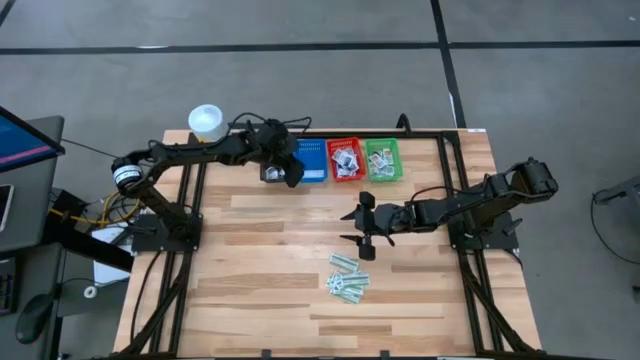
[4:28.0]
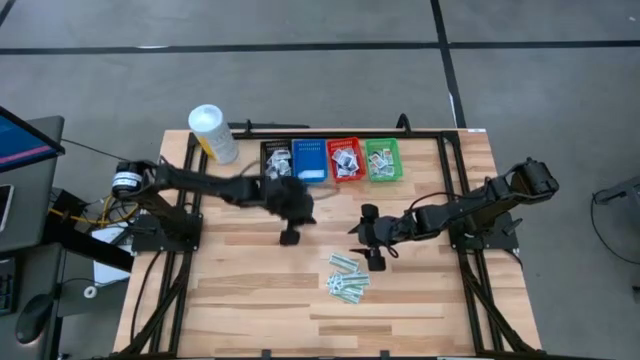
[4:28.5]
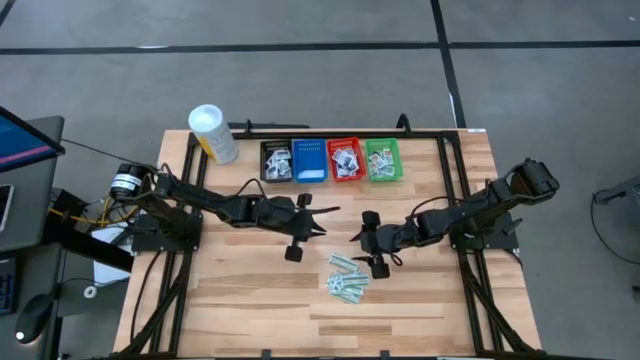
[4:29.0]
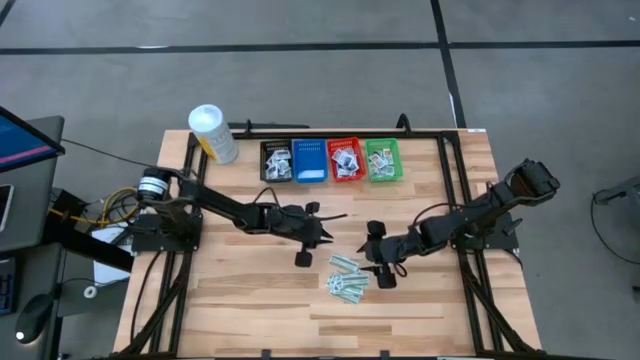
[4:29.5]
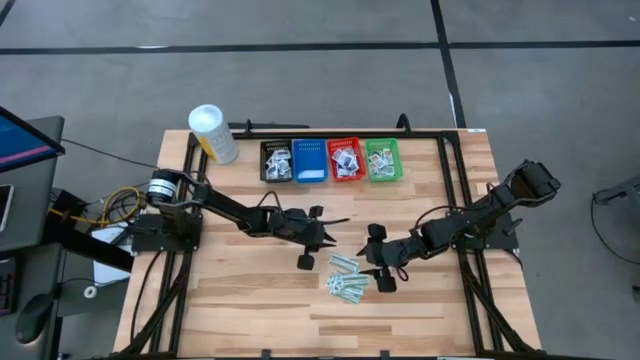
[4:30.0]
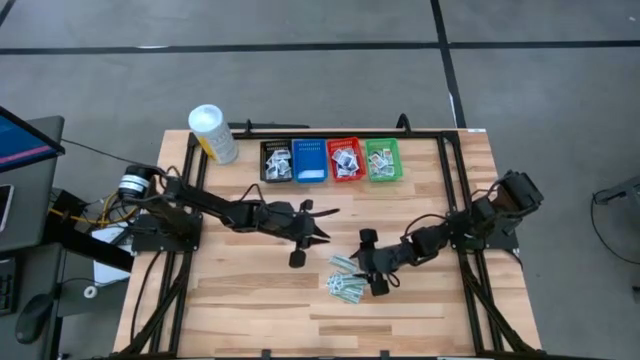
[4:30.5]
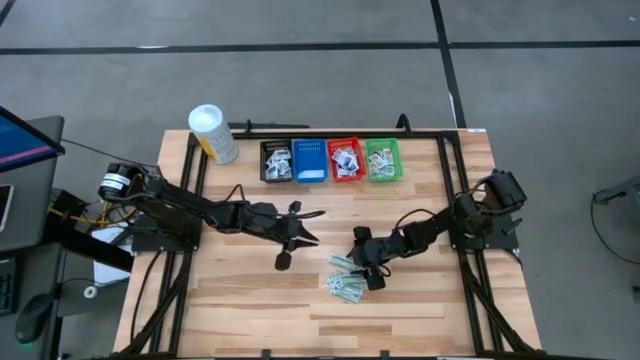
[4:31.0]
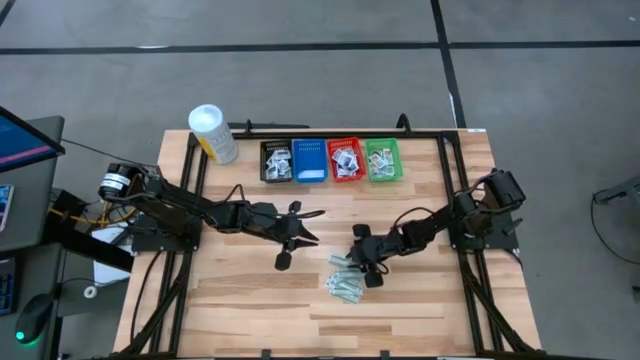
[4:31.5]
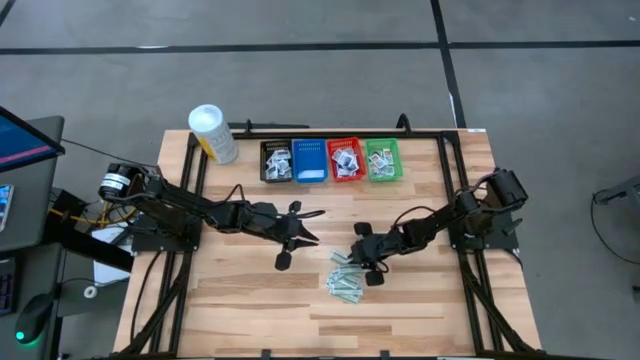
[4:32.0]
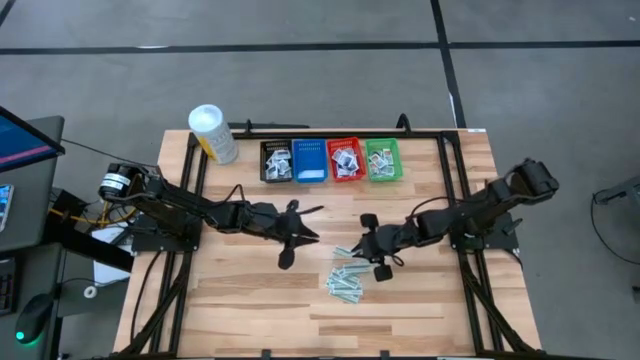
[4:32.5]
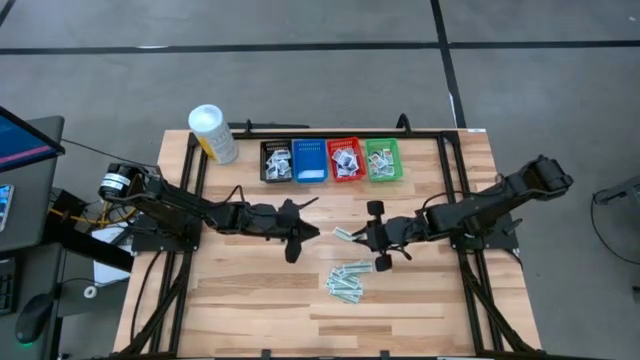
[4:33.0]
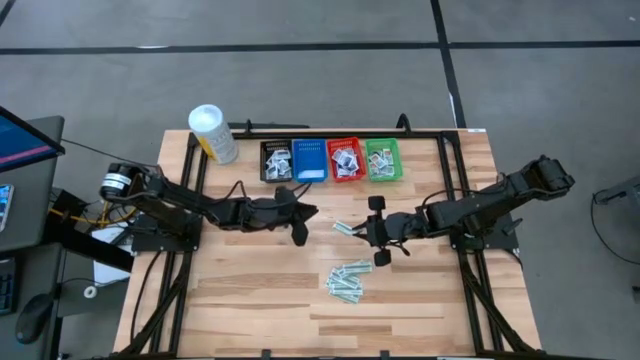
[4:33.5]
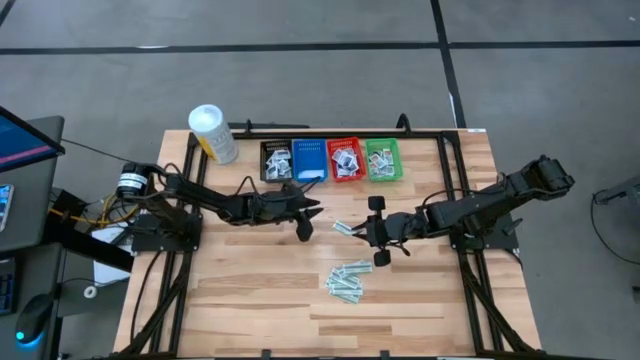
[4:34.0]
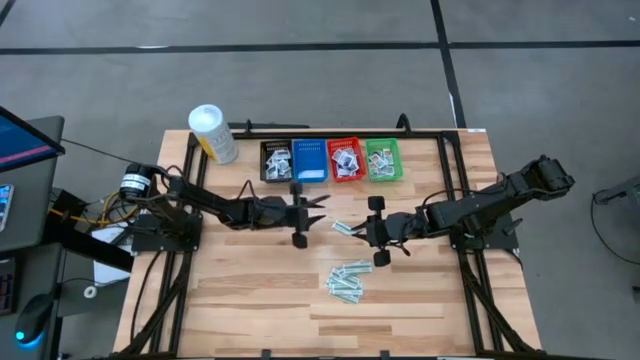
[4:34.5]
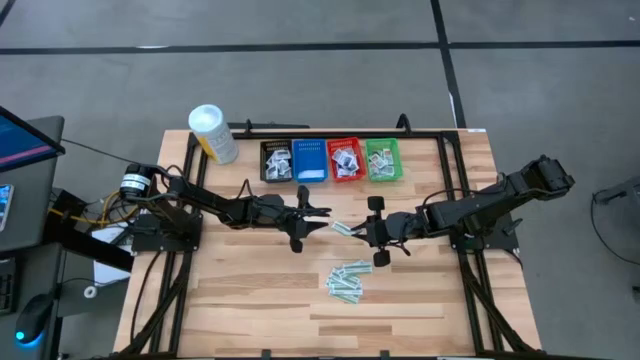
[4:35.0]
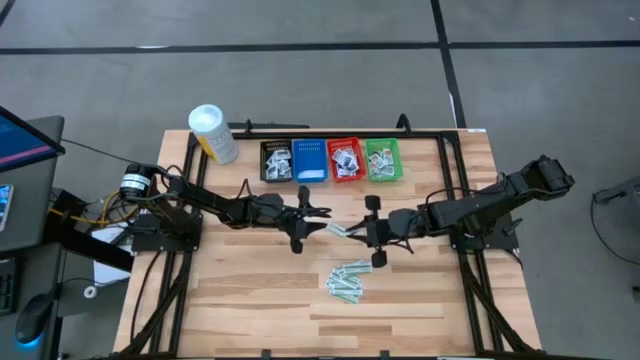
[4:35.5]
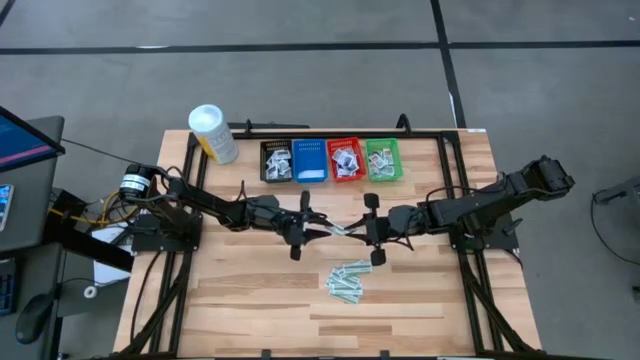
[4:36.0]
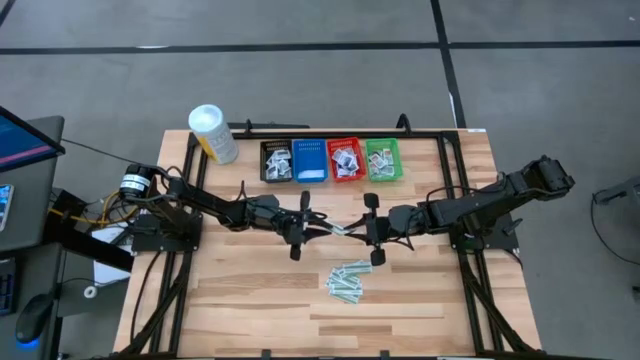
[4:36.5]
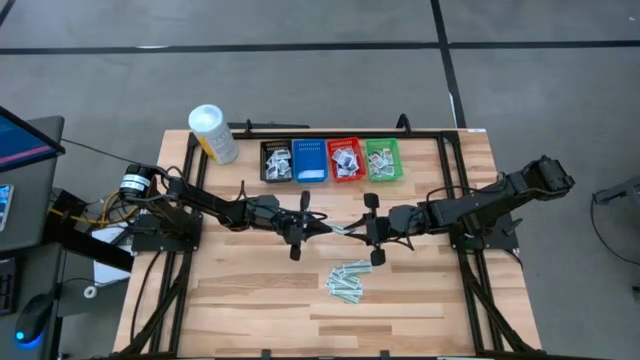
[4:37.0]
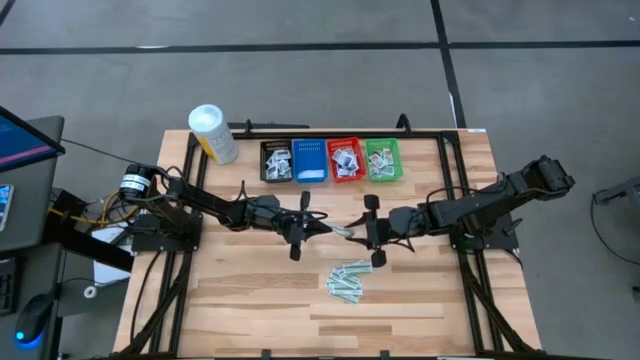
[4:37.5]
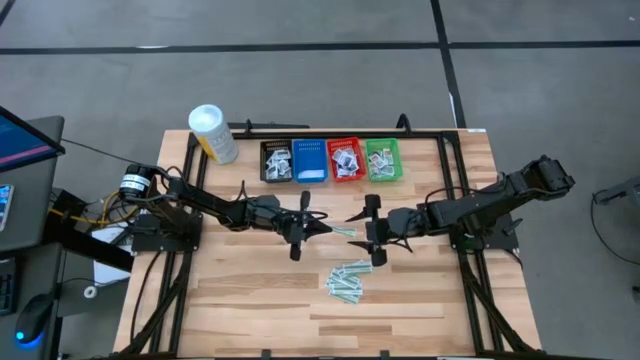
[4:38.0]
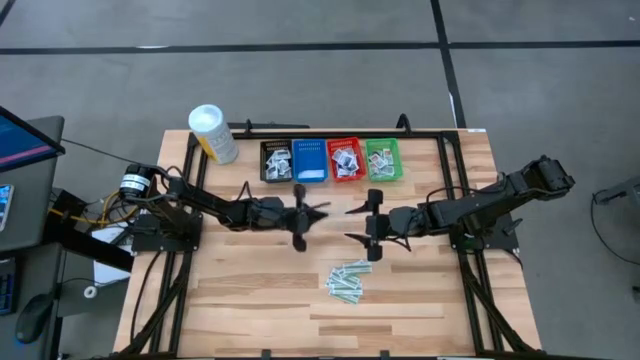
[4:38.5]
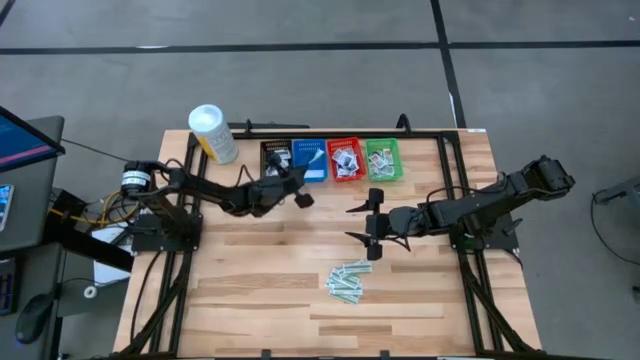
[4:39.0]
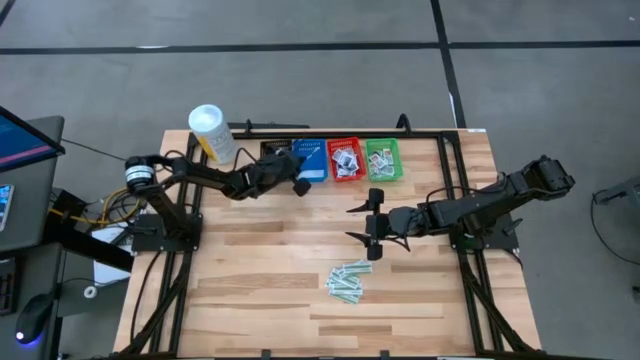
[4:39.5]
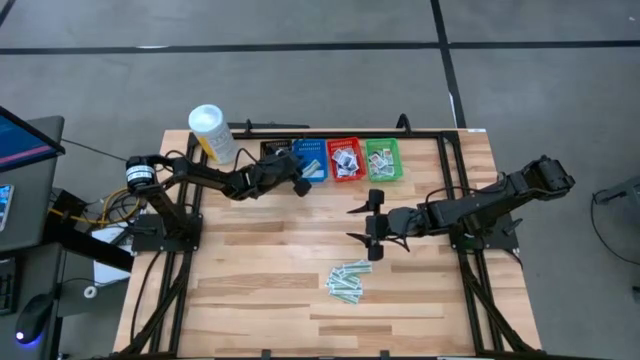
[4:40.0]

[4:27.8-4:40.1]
Task: Pick & Place First Aid Supplies
Put the green pad into the blue bin

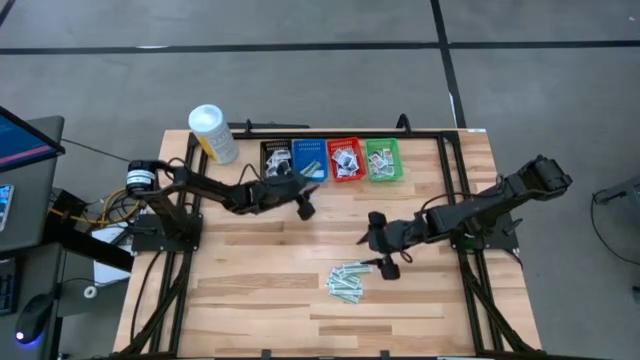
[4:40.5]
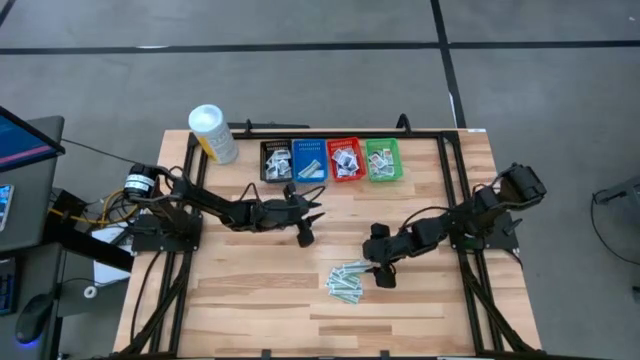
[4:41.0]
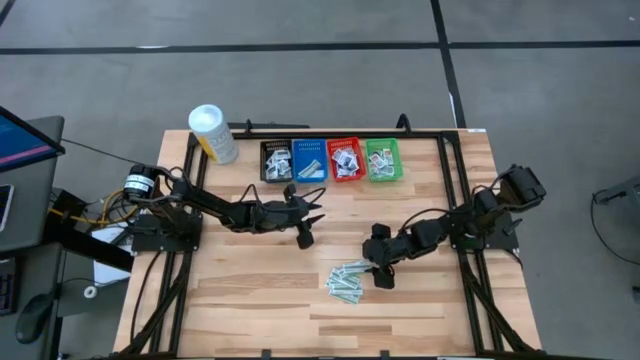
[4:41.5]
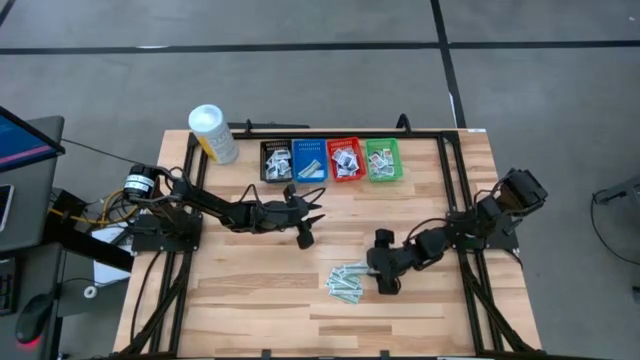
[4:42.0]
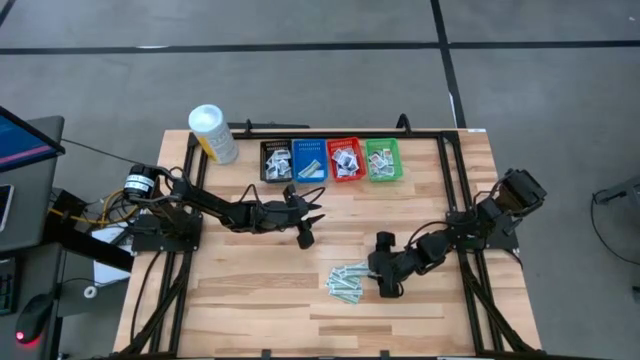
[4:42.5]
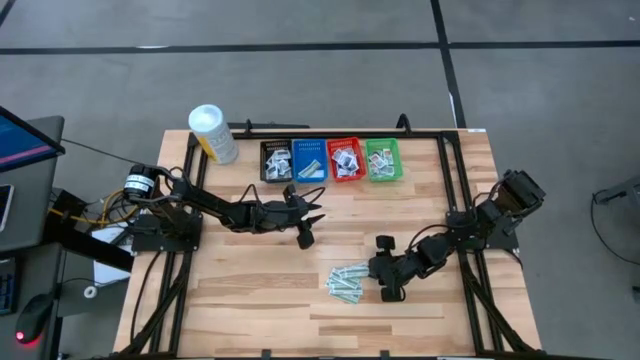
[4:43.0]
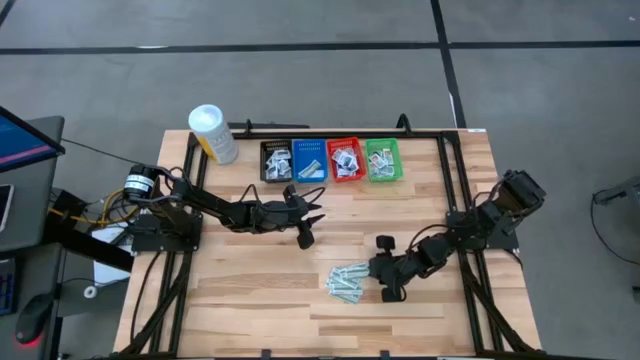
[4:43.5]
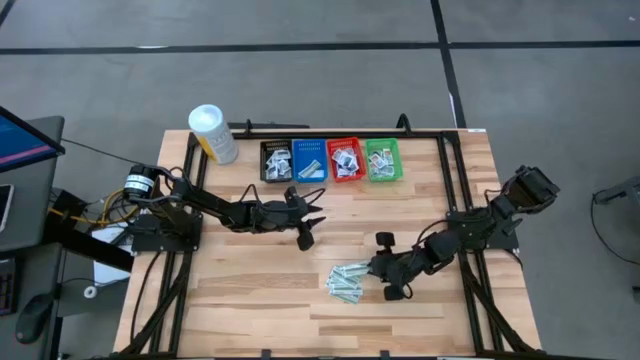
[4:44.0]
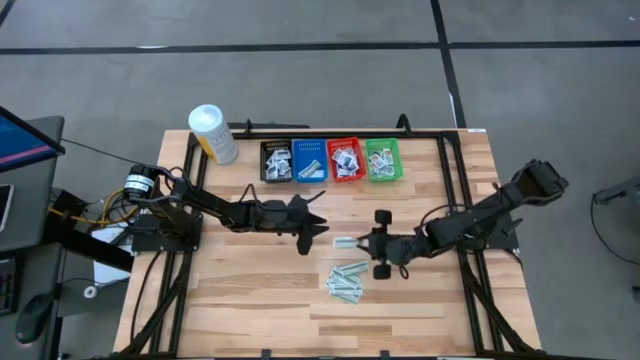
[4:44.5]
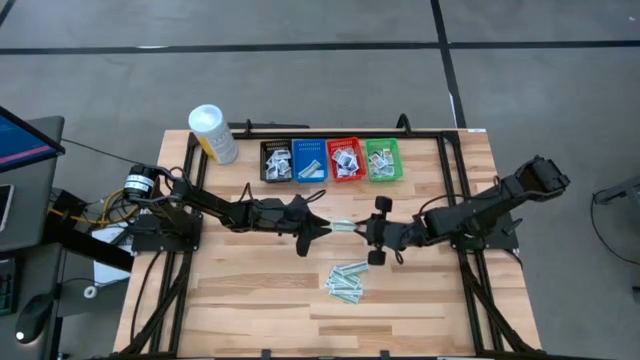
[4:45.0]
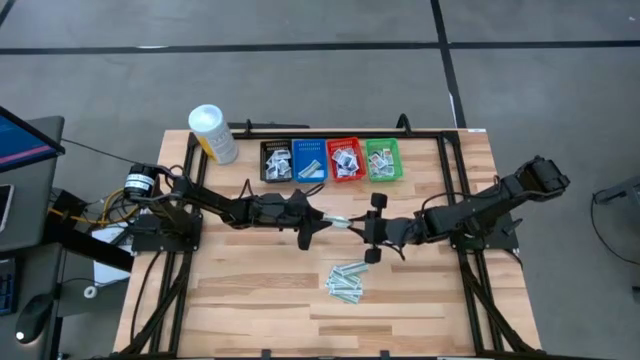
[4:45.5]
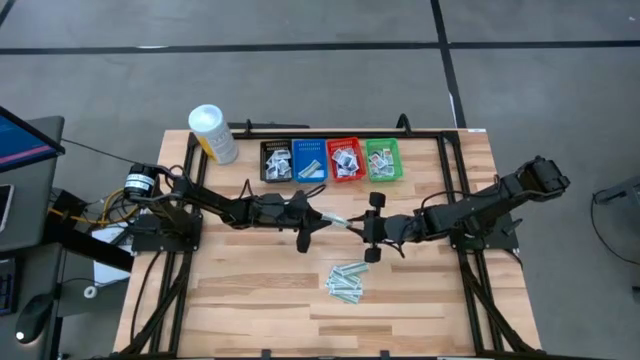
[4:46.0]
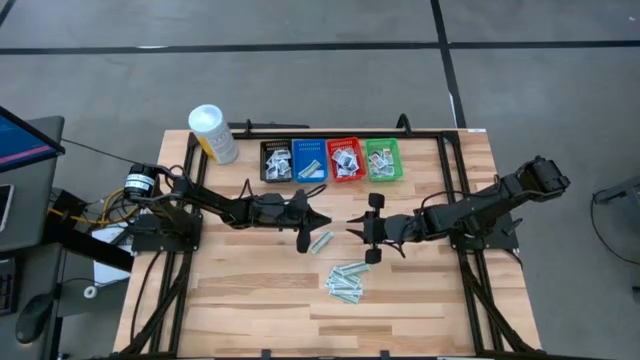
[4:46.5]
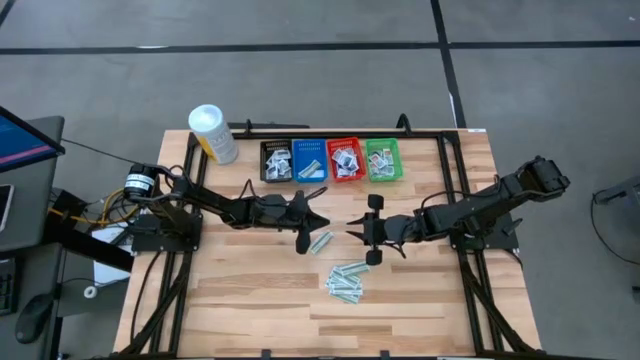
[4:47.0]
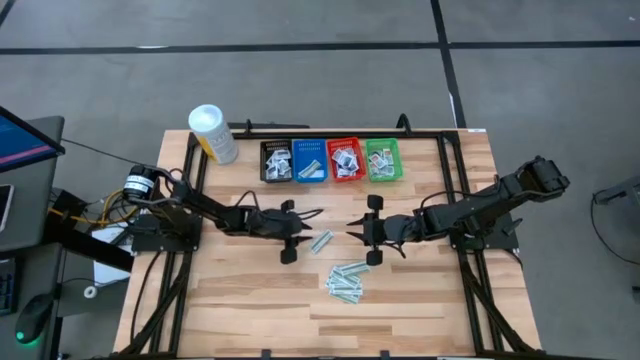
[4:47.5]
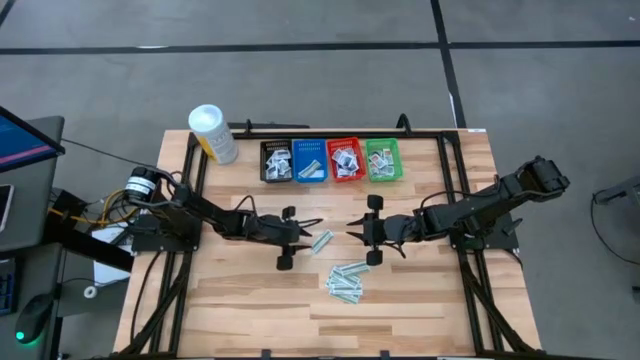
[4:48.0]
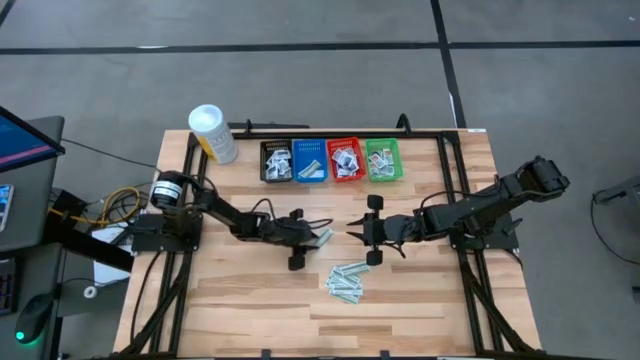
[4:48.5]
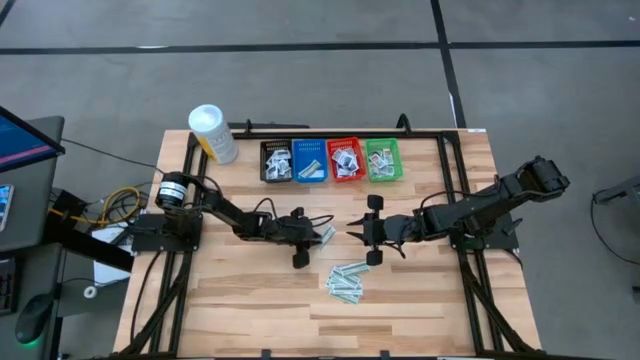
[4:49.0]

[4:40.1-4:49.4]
Put the green pad into the blue bin

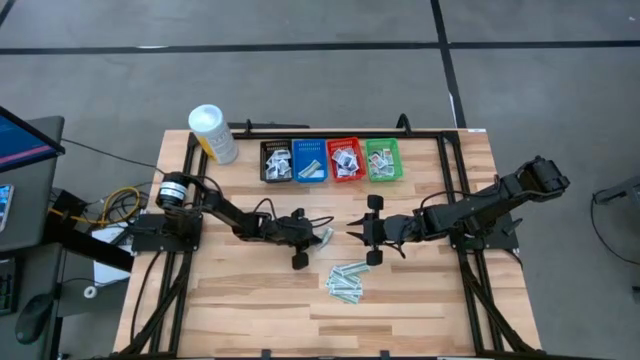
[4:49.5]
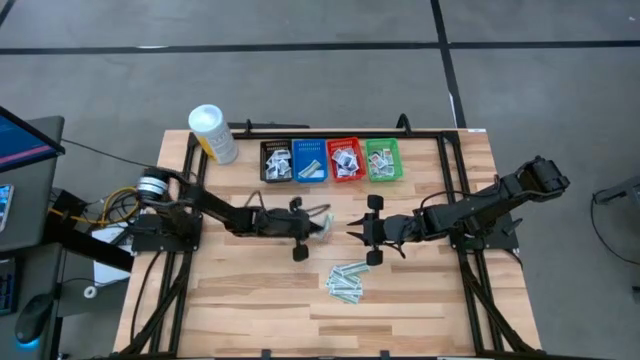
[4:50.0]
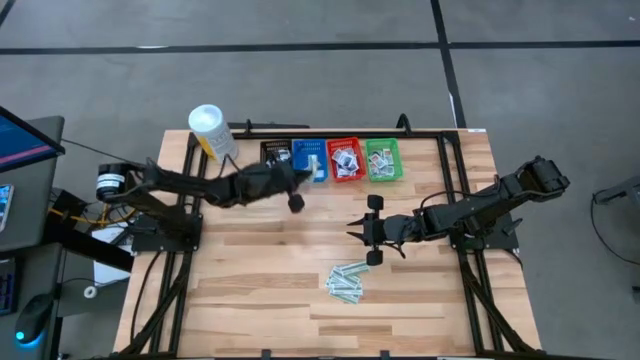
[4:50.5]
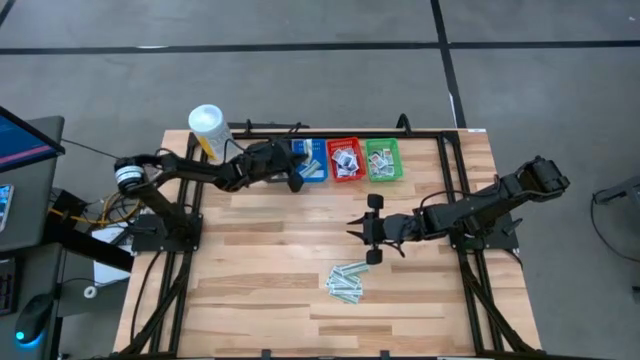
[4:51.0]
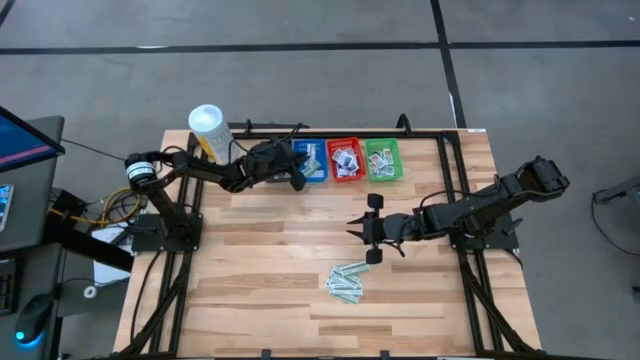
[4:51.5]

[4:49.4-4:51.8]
Put the green pad into the blue bin
